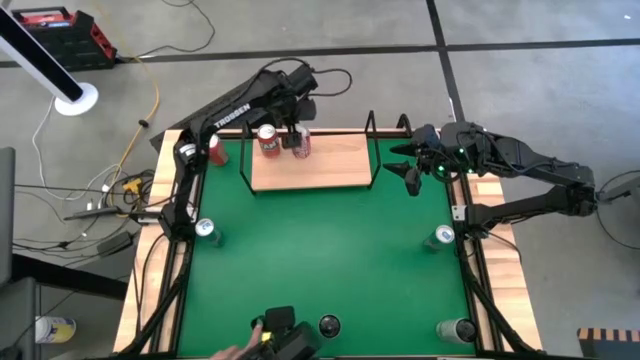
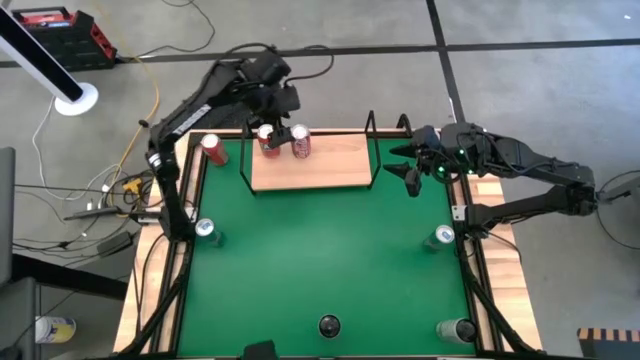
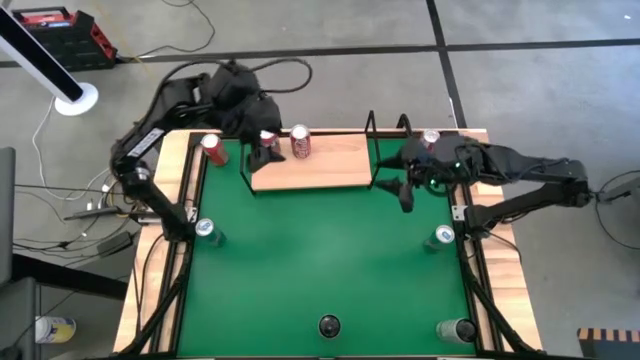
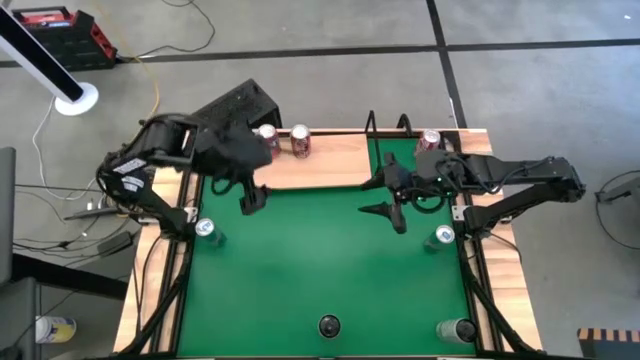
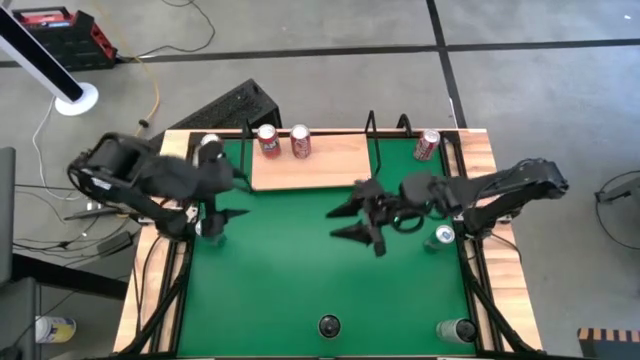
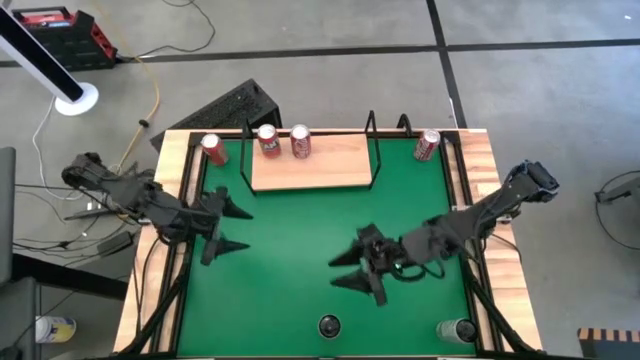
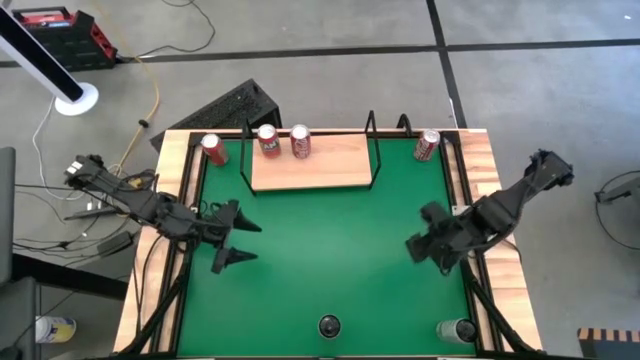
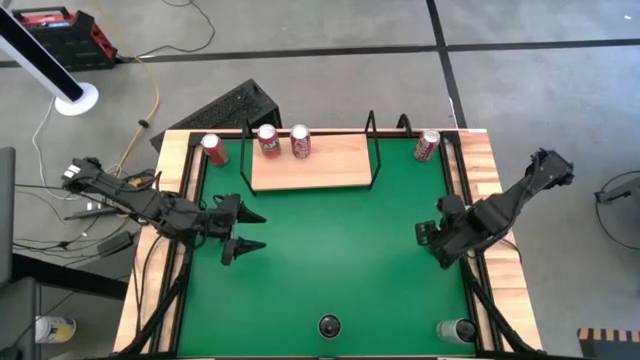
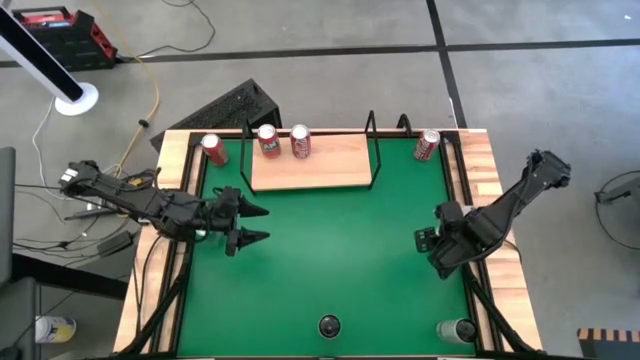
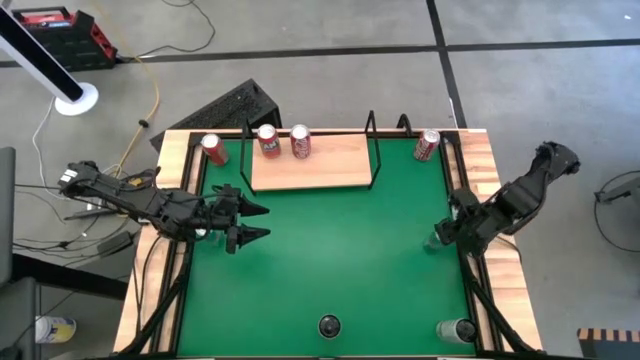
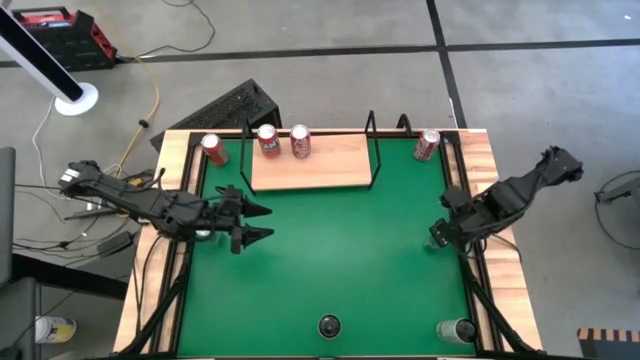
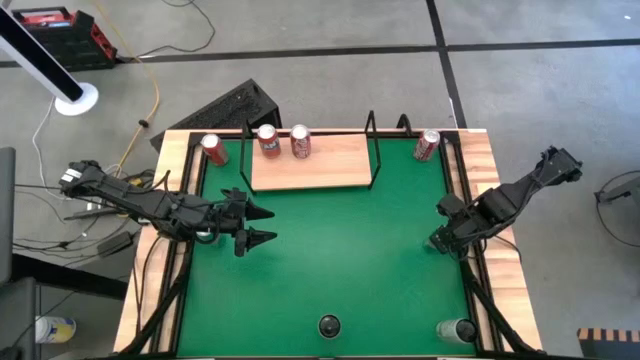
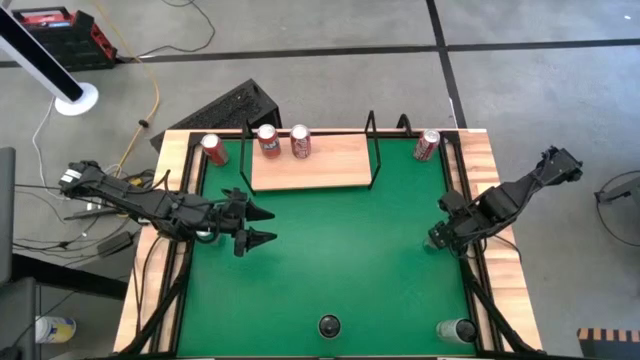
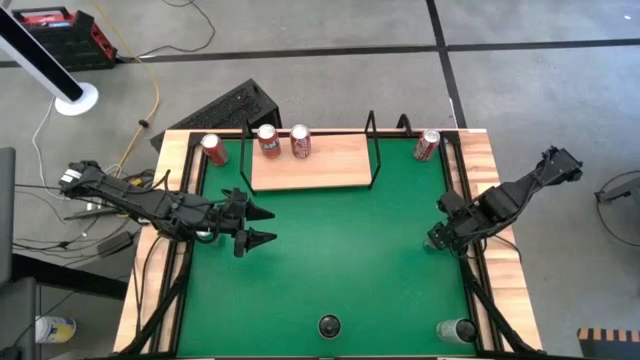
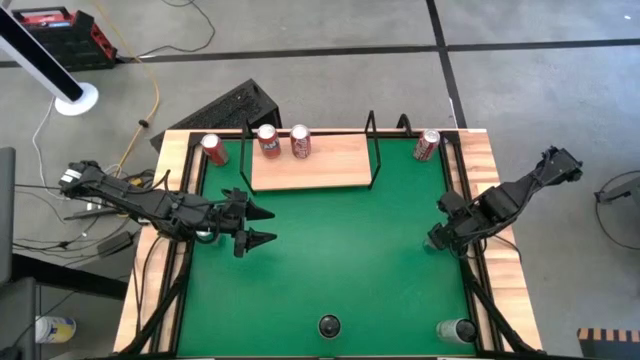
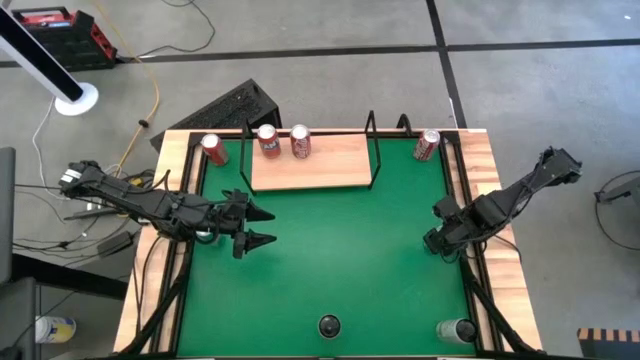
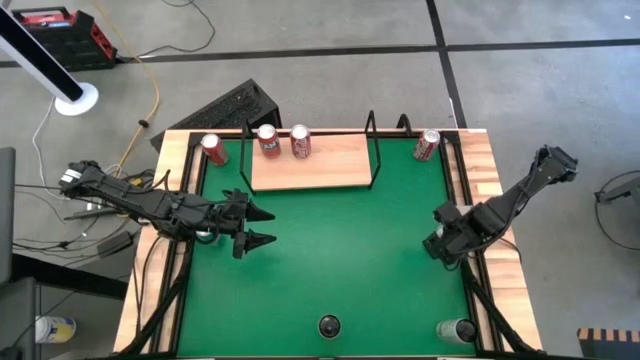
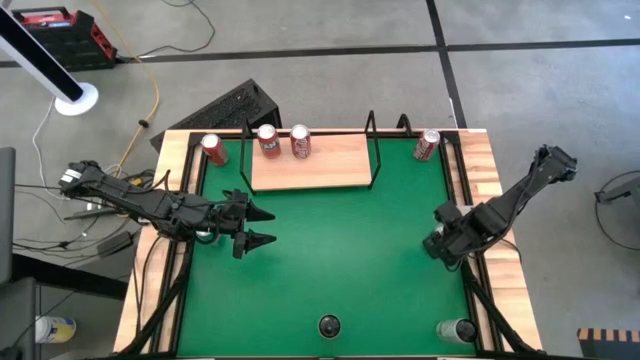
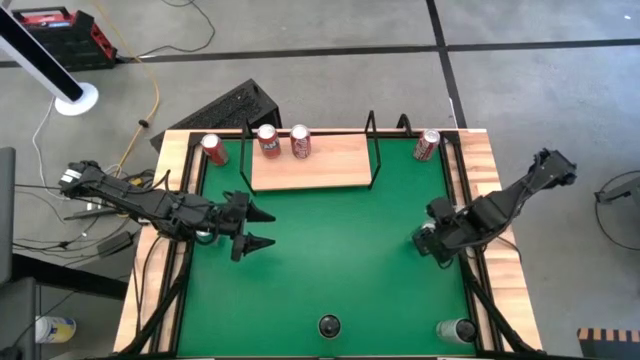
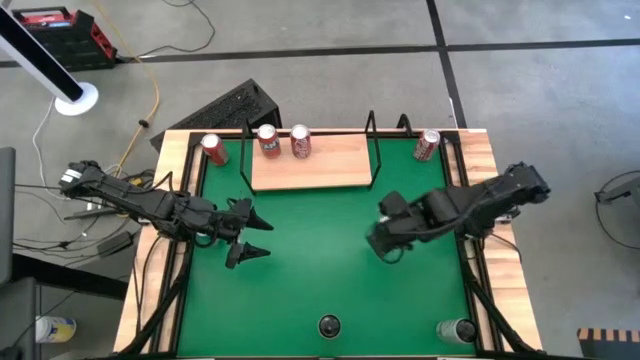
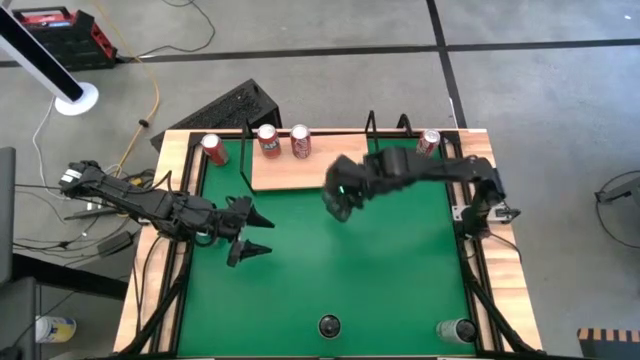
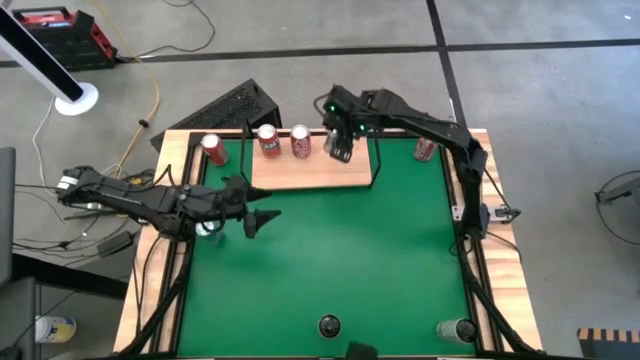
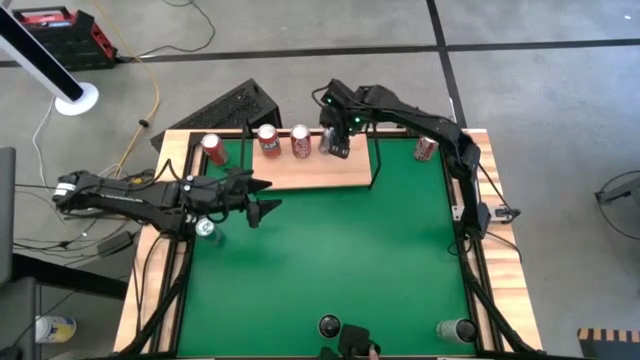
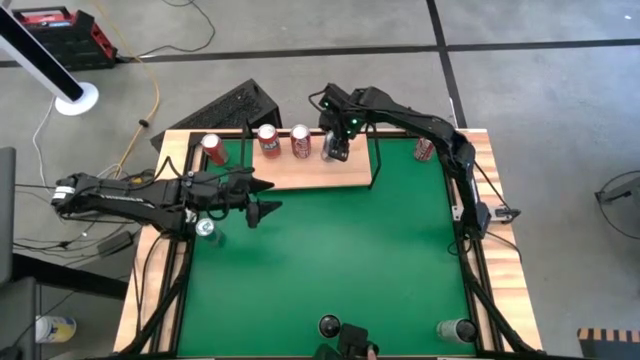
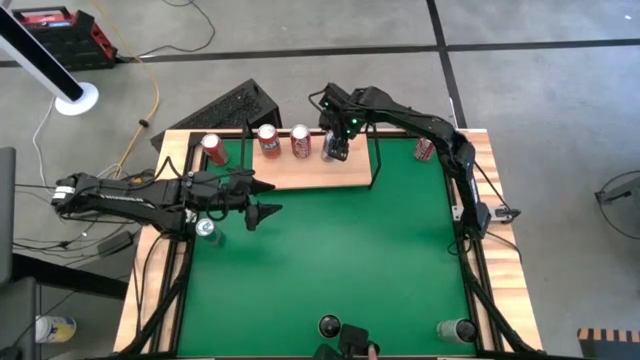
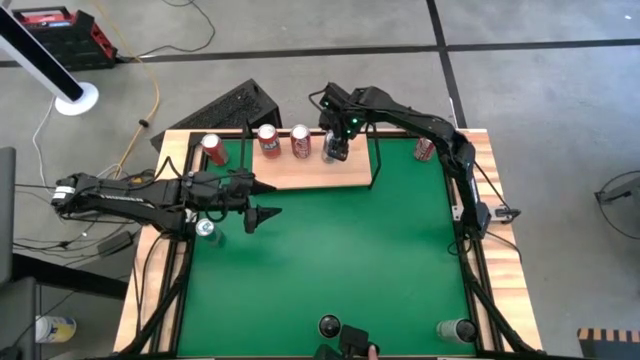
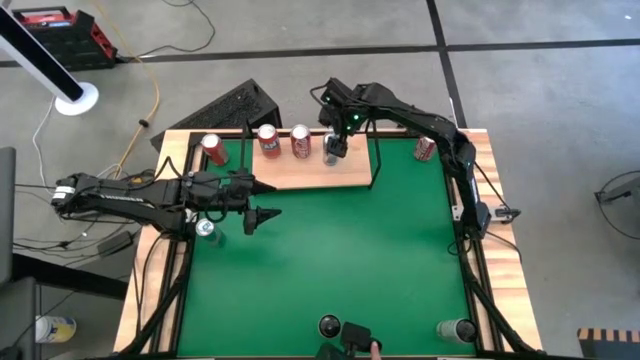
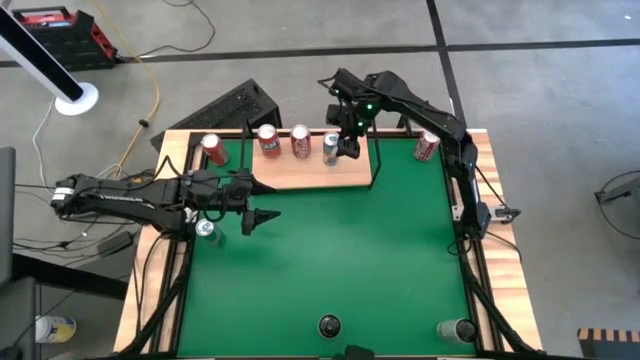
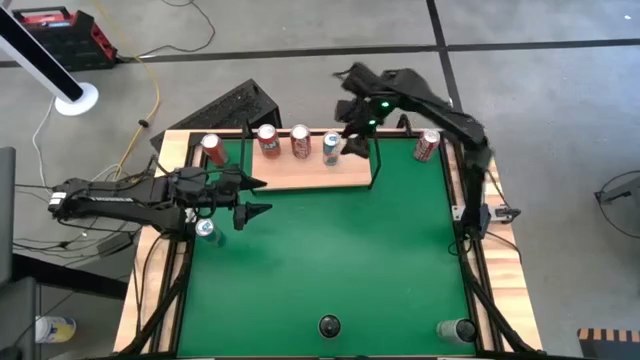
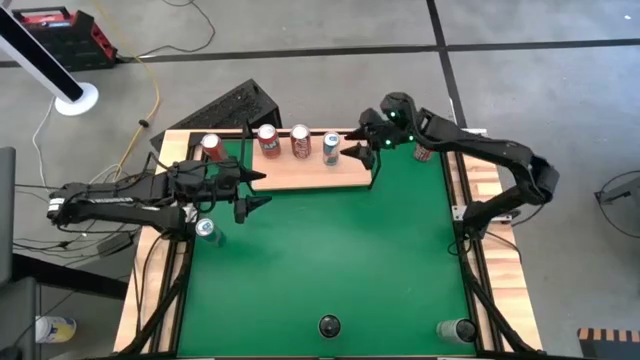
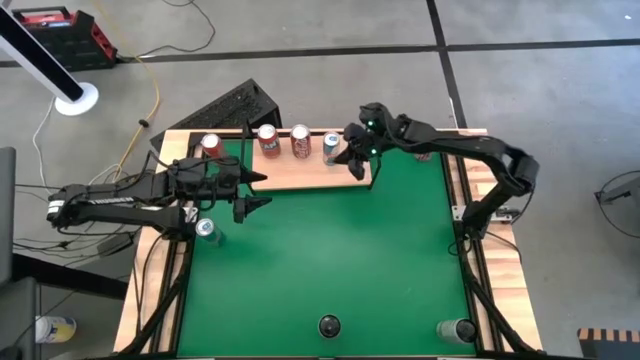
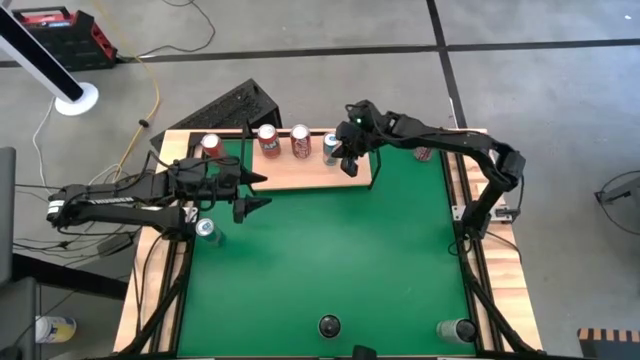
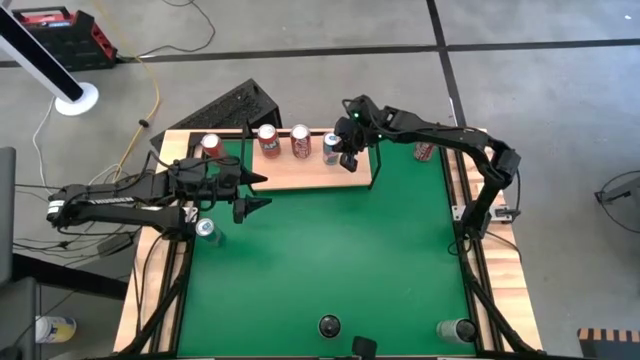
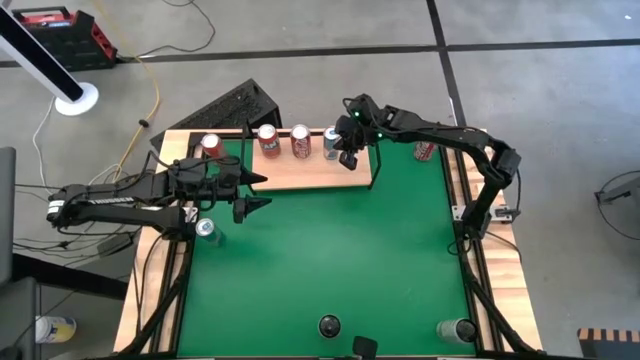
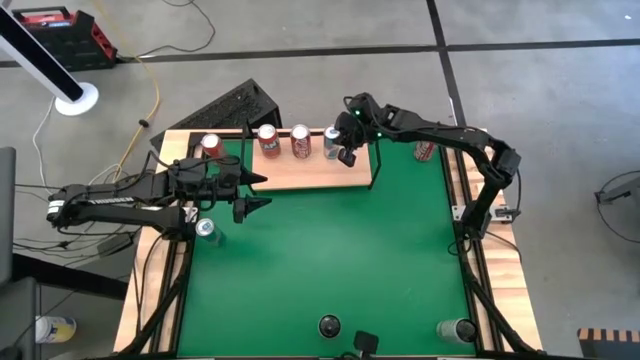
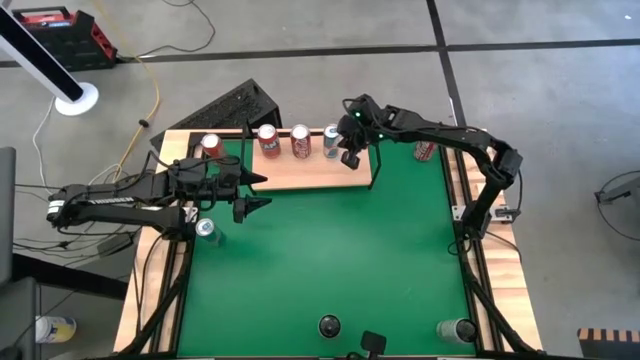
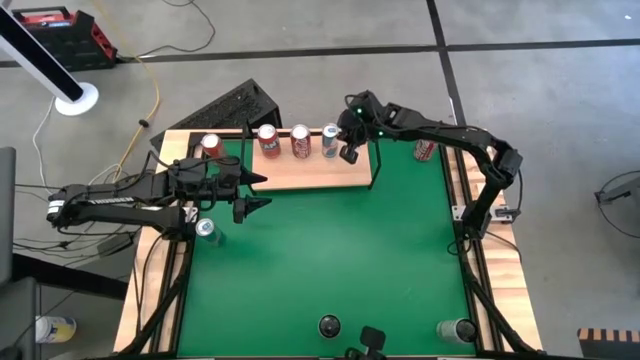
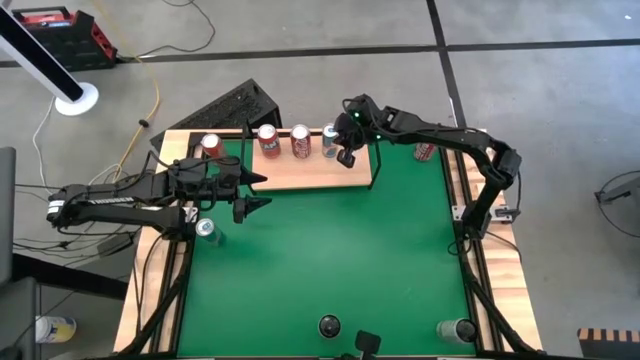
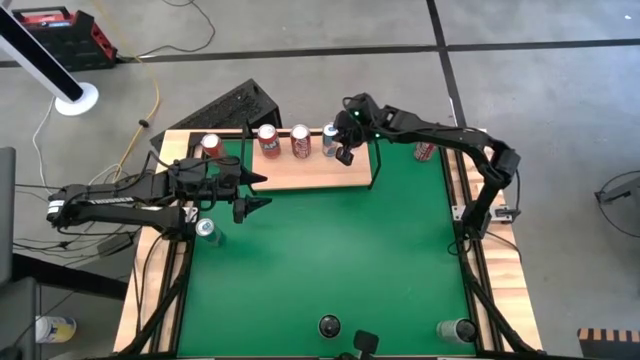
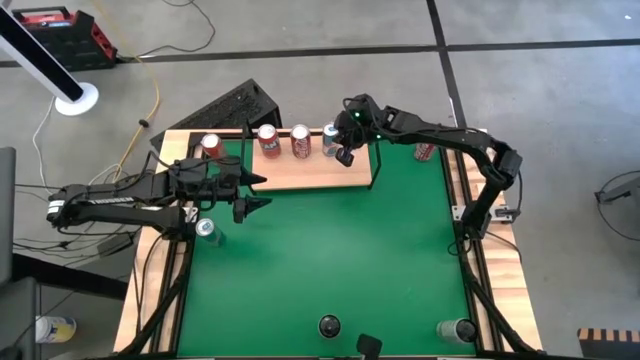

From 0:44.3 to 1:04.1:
Task: Place canned beverage on shelf
Put the right blue soda can on the shelf

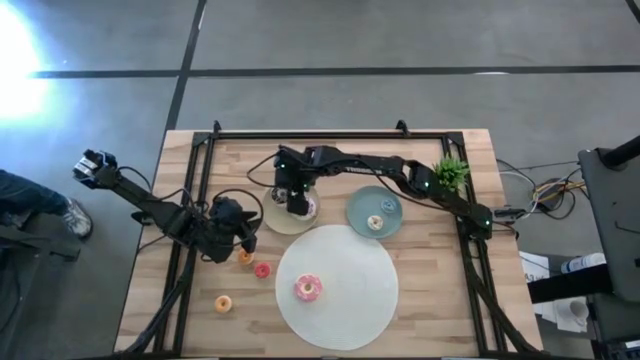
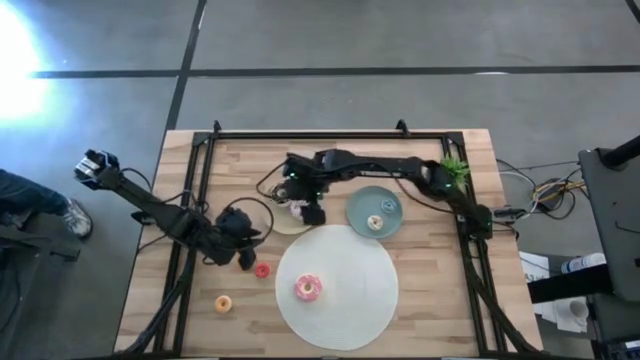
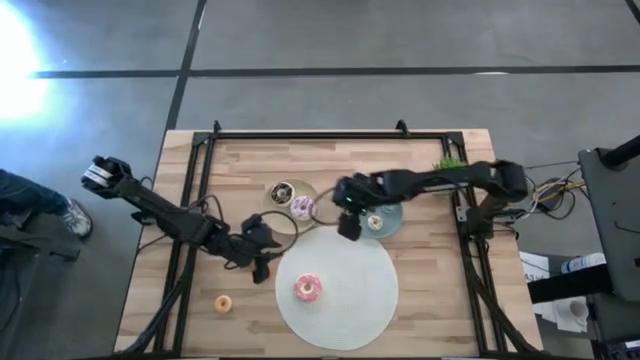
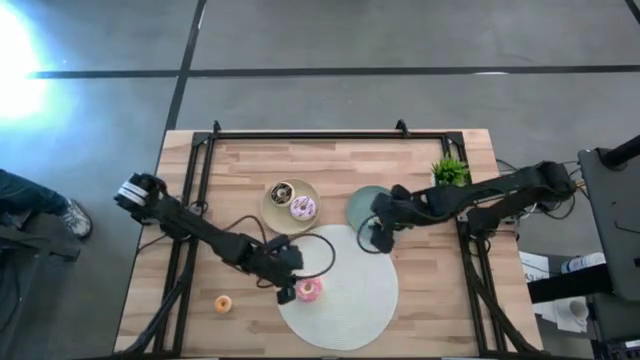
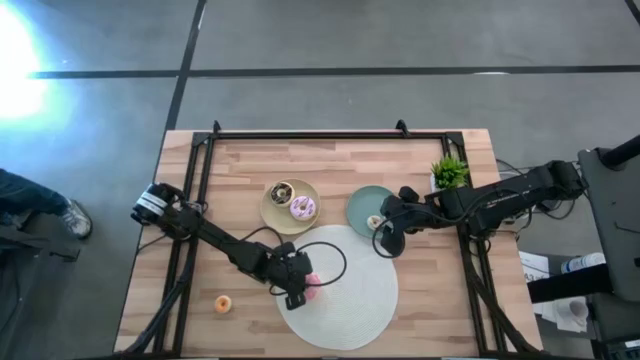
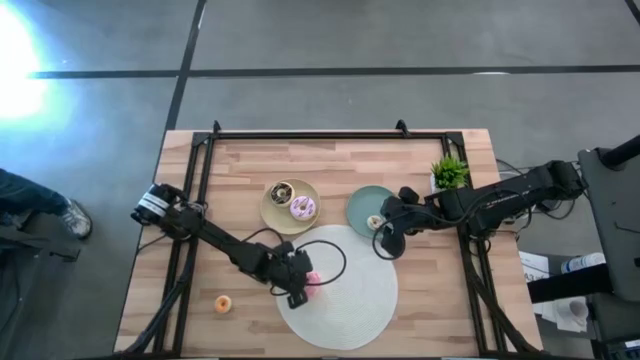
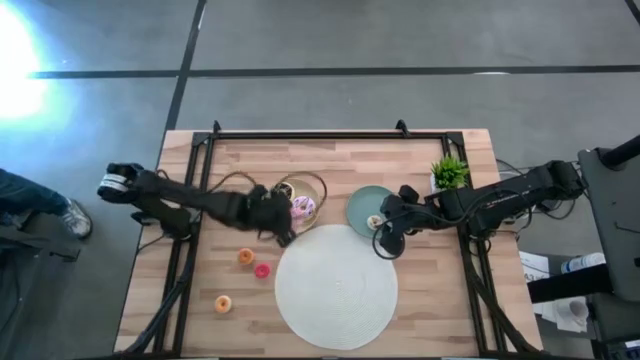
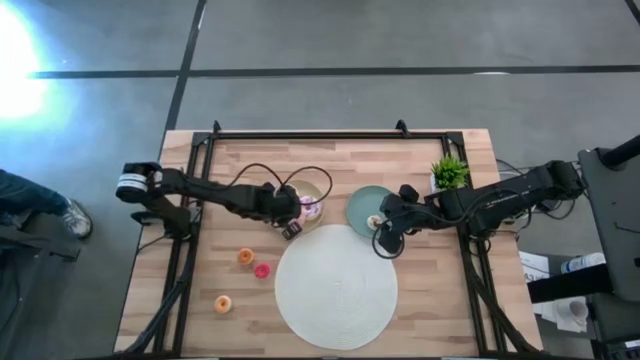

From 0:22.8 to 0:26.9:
Task: Pick & Place donuts
Put the large pink donut on the light yellow plate
